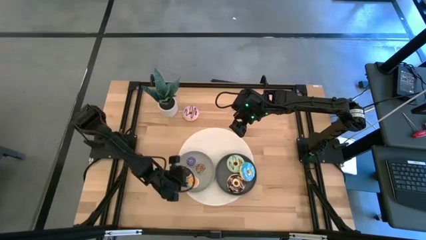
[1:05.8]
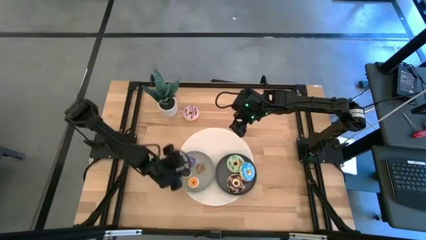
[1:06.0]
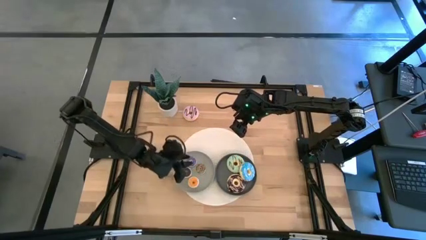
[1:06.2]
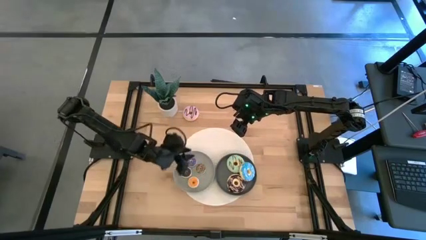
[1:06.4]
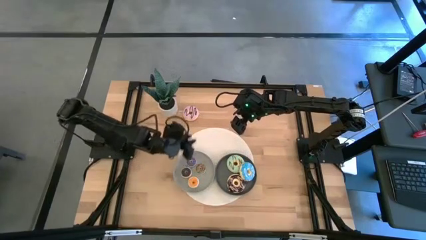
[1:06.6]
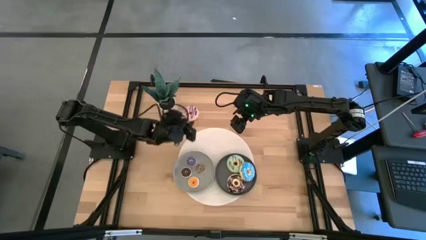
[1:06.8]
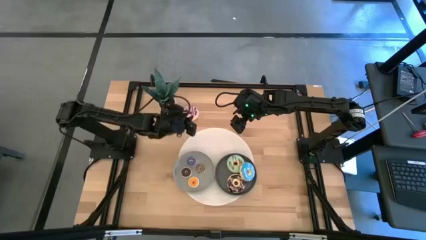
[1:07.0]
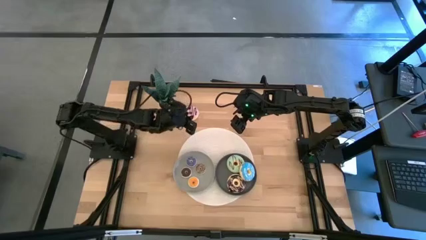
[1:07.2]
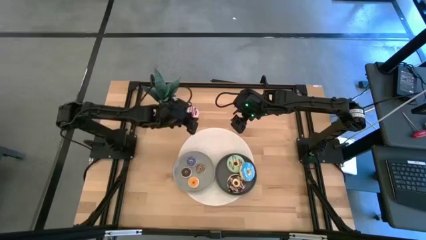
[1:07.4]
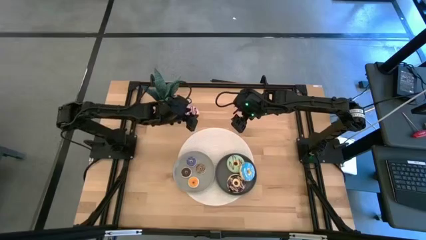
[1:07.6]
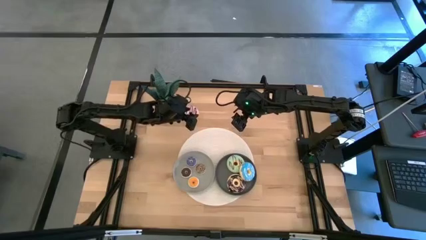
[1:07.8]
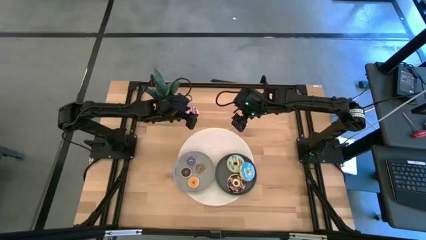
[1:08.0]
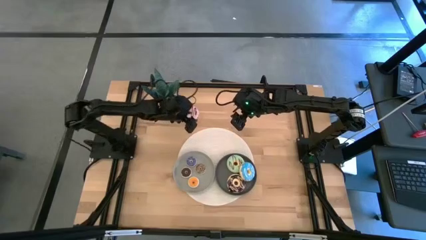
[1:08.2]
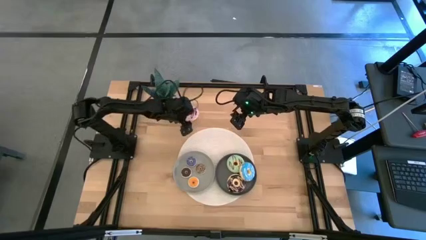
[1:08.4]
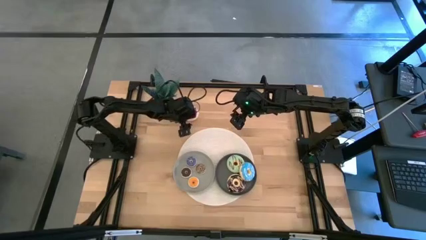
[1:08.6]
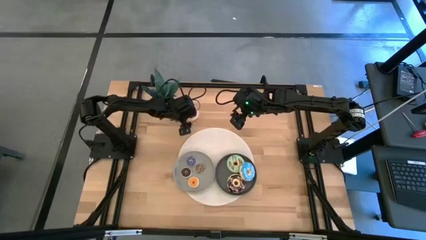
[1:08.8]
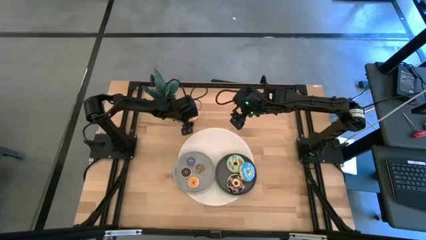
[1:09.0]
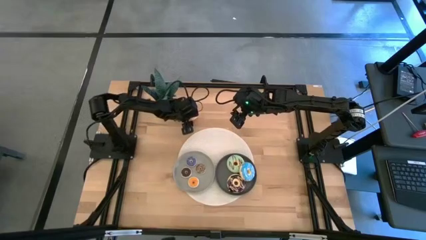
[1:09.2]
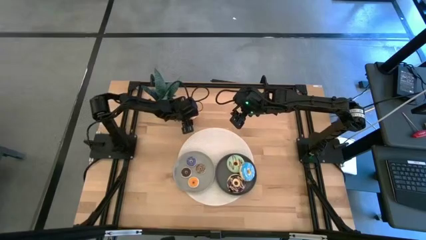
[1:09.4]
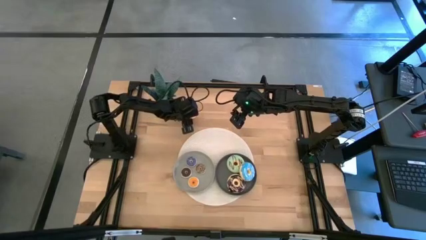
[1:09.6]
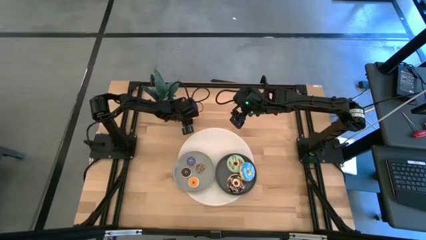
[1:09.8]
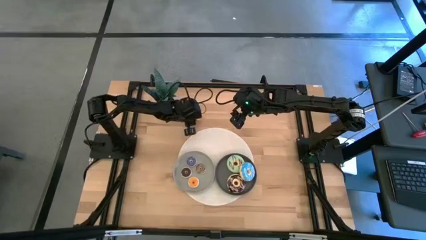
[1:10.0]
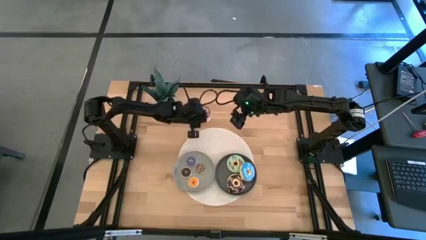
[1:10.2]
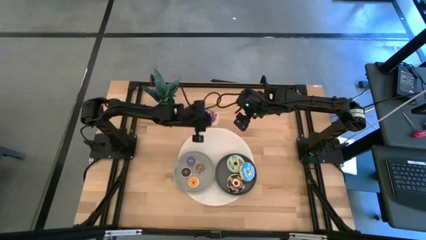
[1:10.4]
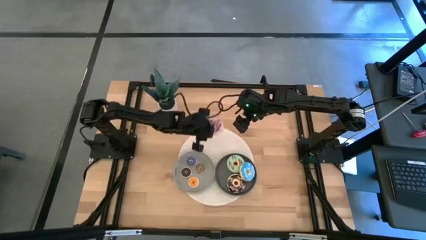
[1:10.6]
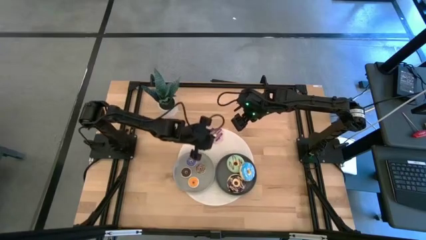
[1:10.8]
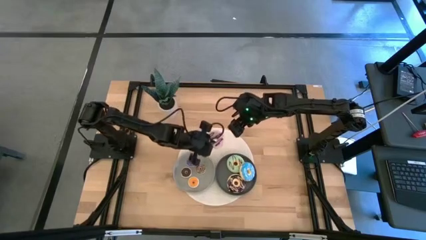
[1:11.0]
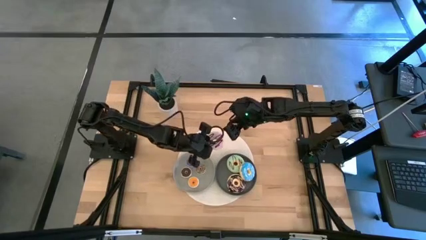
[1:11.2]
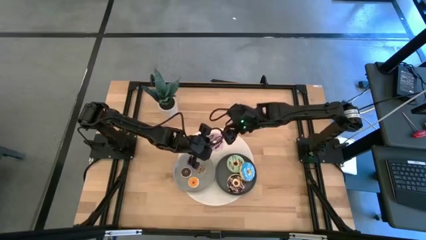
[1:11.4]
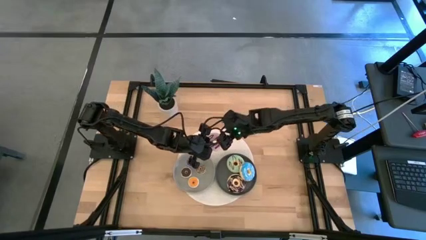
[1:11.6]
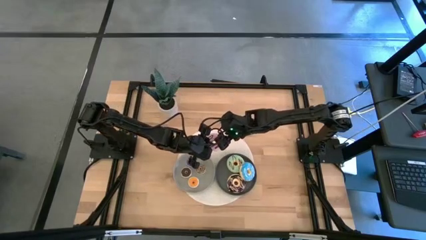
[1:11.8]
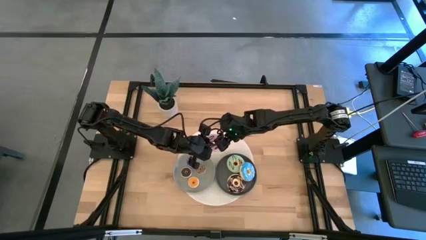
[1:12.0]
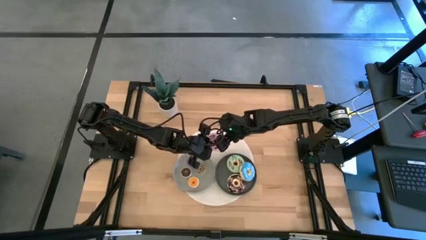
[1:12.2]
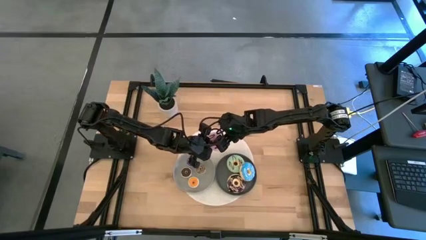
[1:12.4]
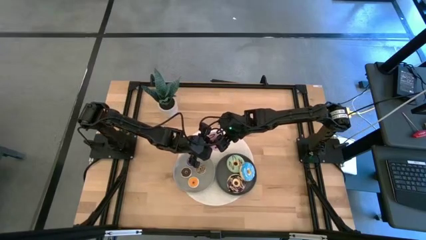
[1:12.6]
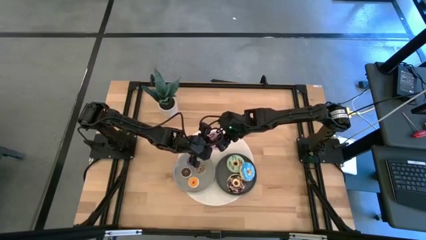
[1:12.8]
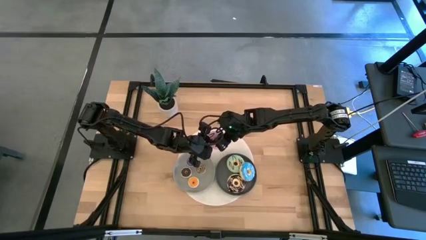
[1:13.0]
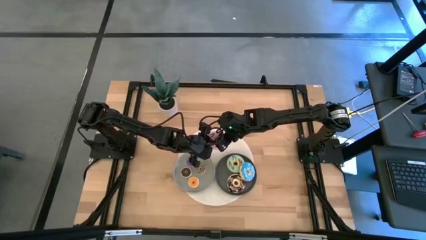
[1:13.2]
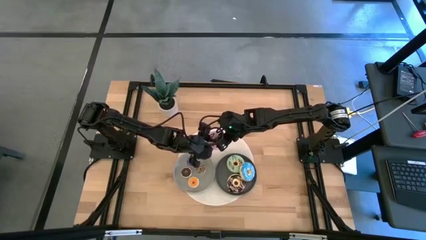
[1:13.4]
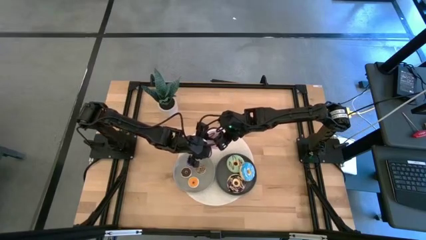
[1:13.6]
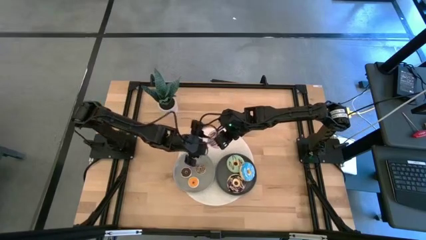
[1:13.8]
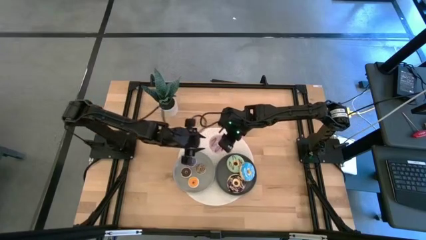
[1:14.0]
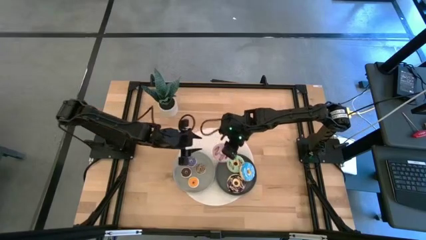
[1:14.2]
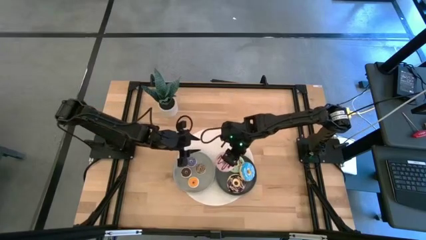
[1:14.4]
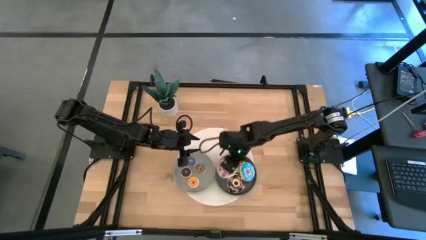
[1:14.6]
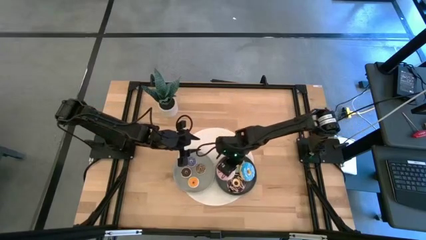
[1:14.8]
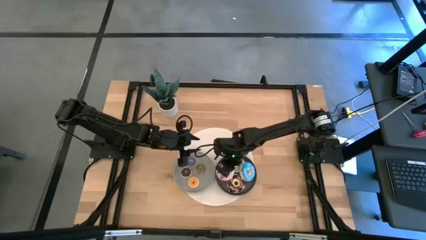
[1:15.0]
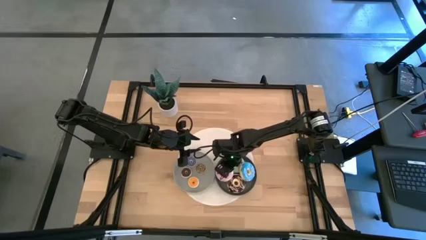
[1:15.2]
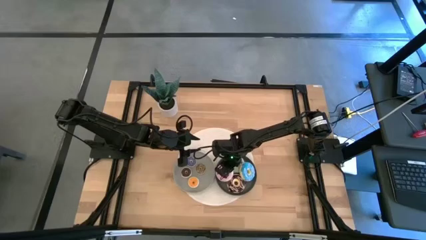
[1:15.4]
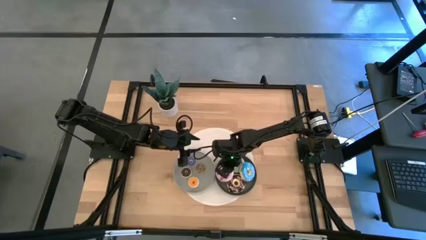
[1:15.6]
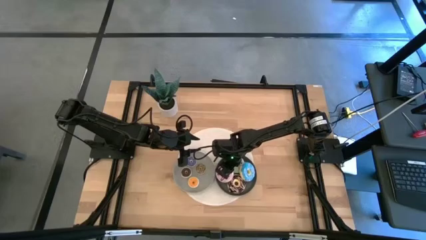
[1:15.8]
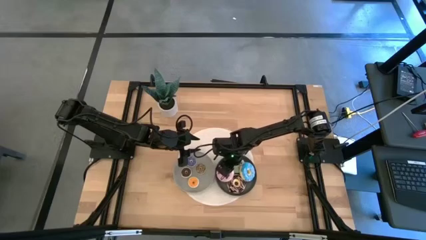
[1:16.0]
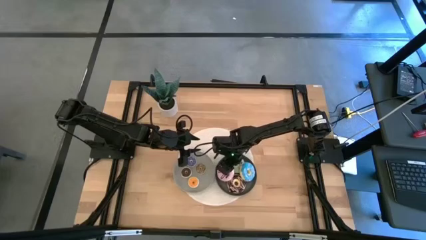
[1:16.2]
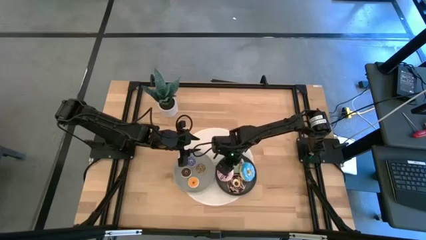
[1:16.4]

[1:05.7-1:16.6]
Task: Pick & Place donuts
Put the large purple donut on the dark gray plate

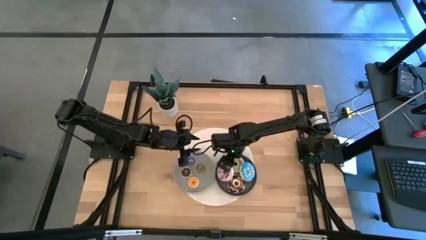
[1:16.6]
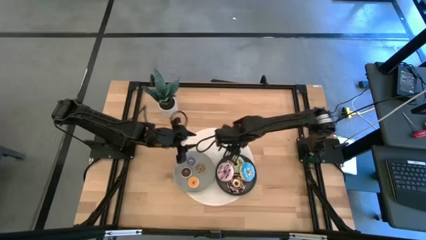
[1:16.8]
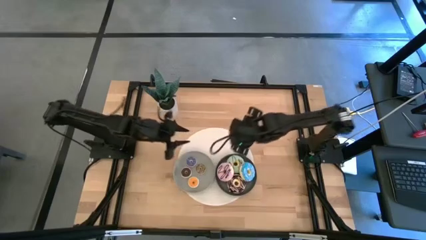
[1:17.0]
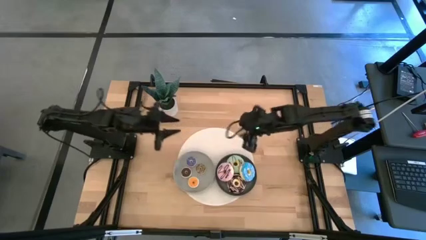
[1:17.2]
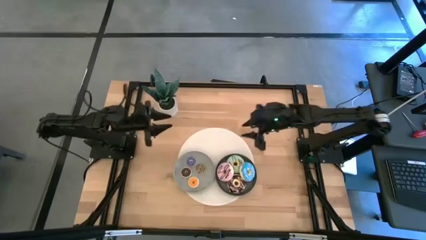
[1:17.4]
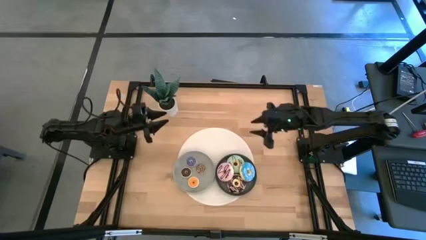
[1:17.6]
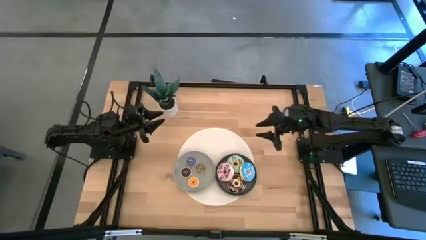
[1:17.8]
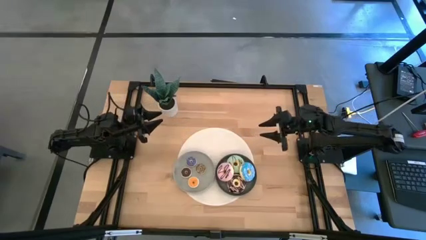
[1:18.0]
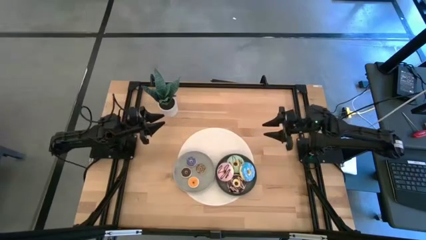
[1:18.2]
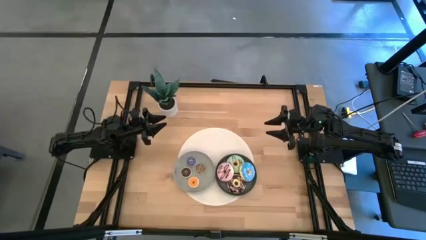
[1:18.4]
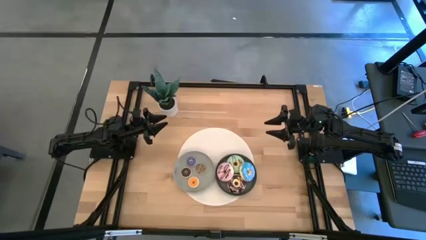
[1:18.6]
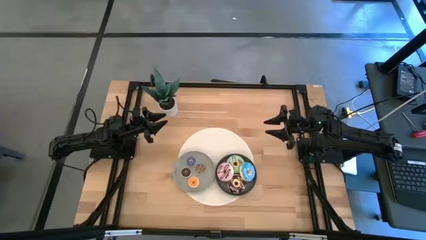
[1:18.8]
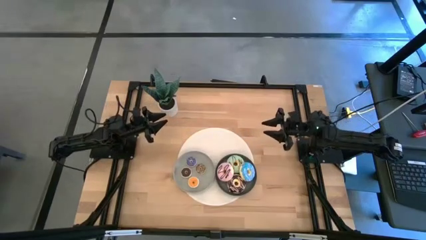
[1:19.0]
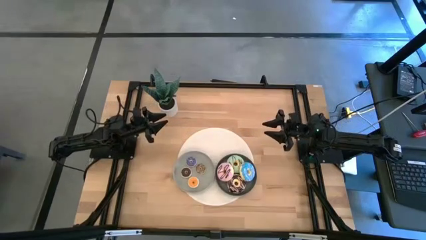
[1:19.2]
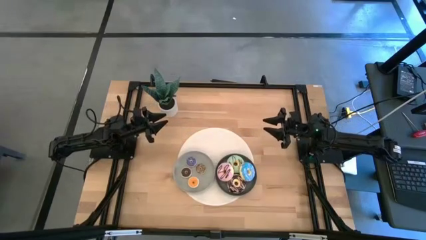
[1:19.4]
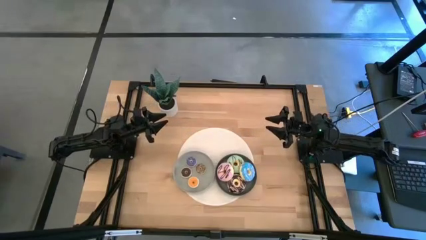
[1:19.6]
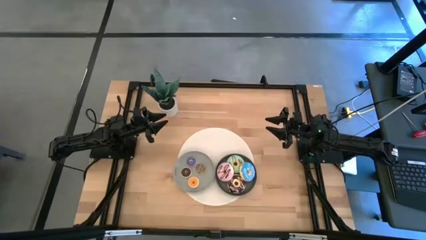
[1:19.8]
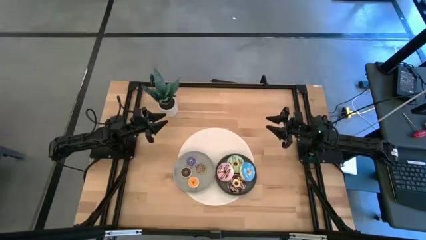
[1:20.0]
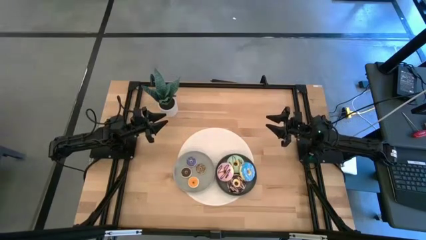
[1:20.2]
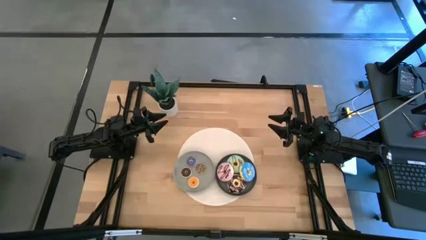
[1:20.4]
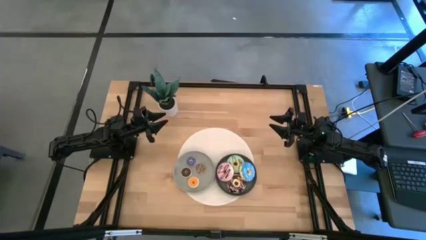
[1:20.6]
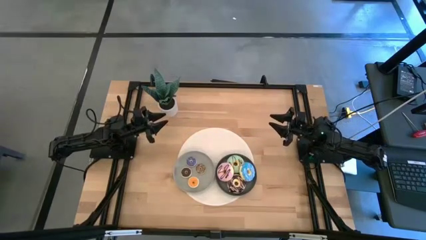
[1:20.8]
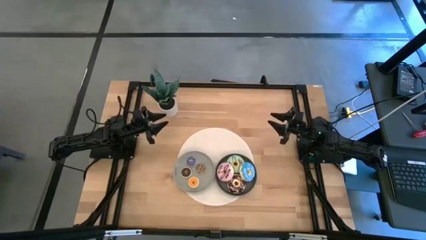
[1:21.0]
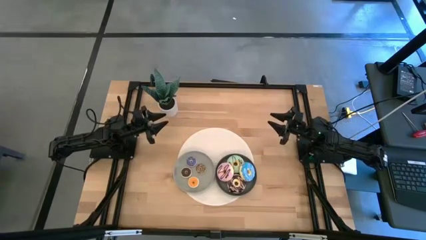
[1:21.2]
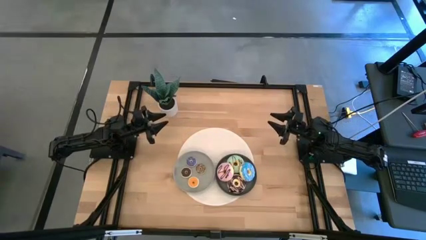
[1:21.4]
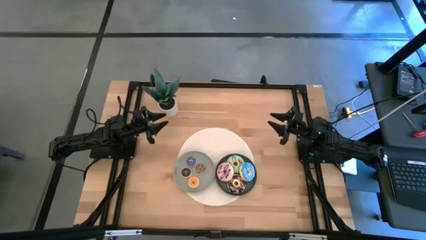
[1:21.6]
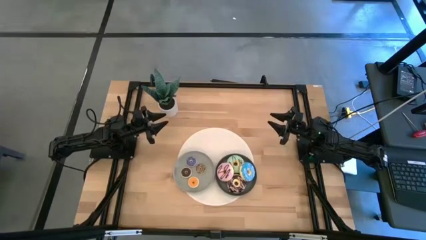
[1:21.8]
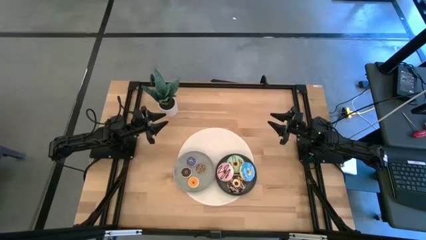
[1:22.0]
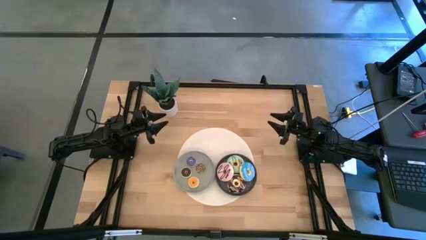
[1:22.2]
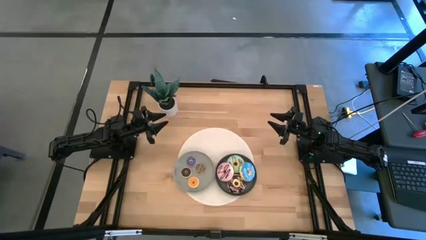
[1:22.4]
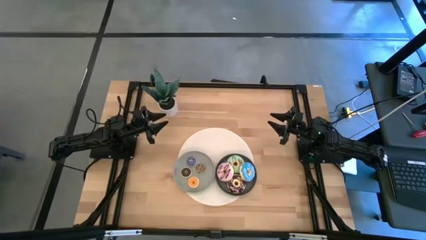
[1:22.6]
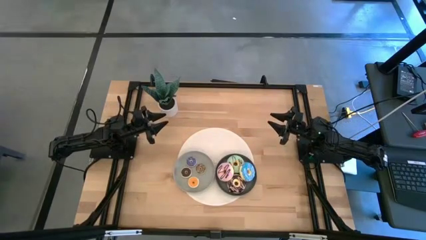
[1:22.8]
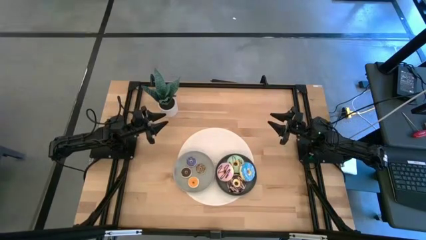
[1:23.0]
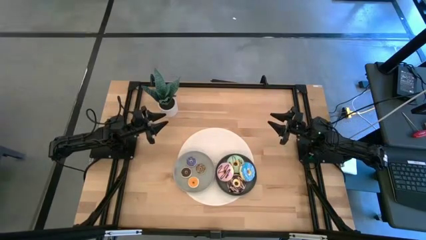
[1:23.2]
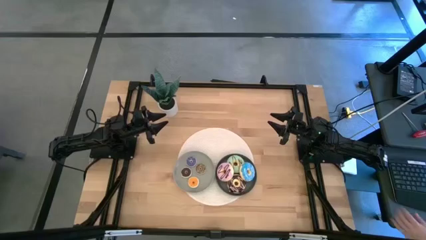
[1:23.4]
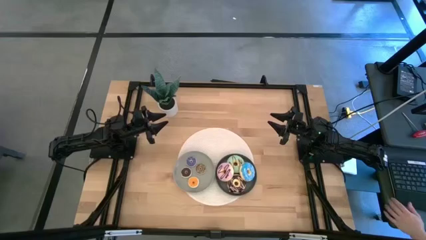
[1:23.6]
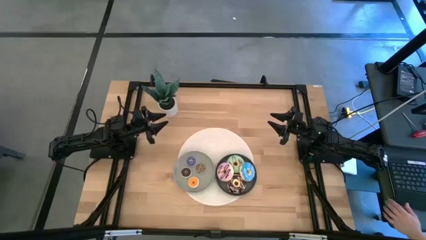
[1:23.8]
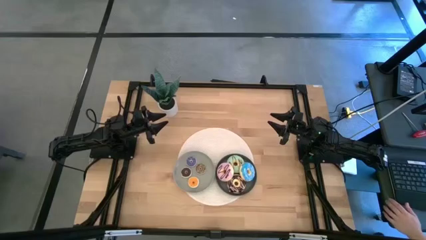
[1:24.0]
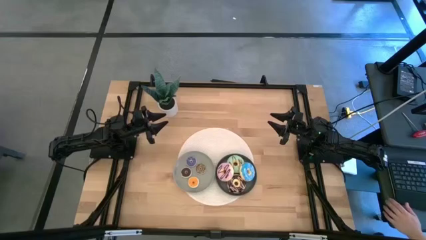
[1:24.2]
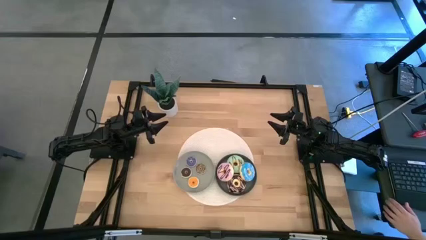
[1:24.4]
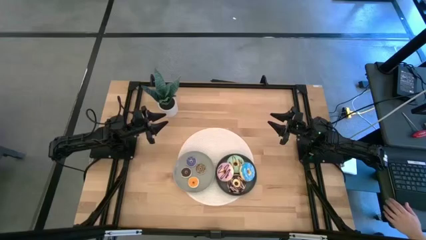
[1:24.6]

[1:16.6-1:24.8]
Return to Home Position
